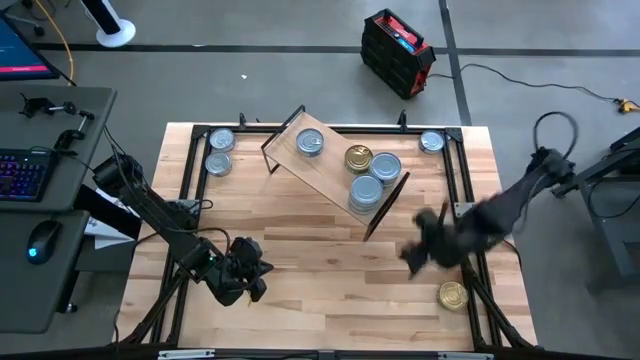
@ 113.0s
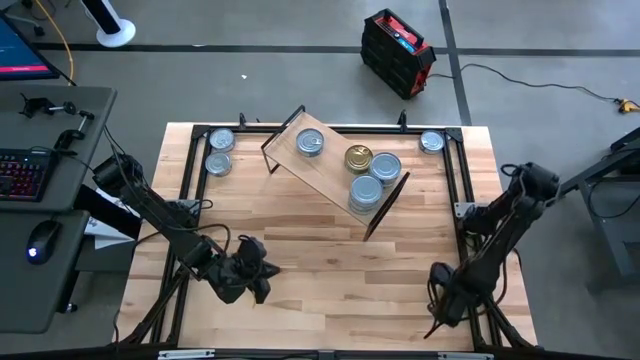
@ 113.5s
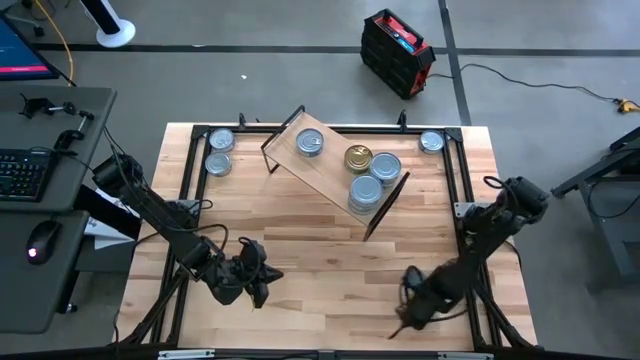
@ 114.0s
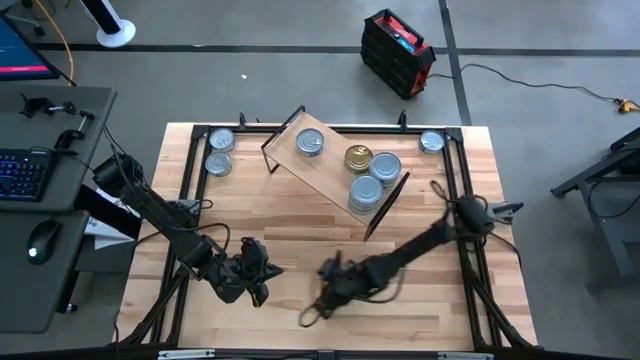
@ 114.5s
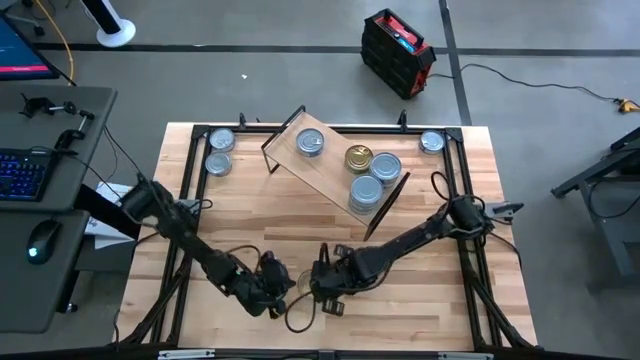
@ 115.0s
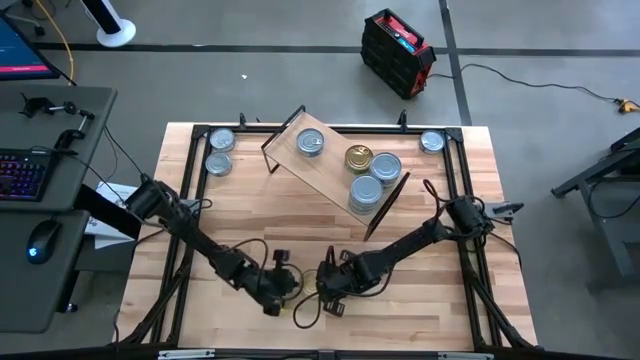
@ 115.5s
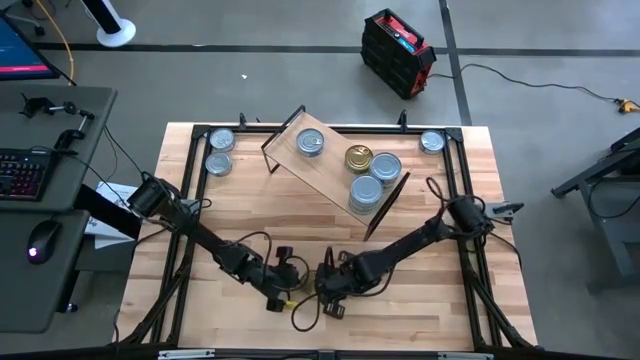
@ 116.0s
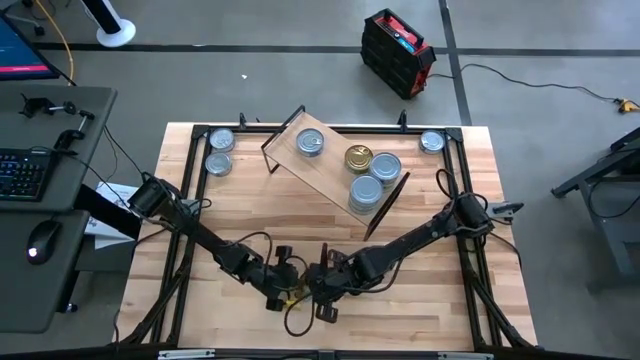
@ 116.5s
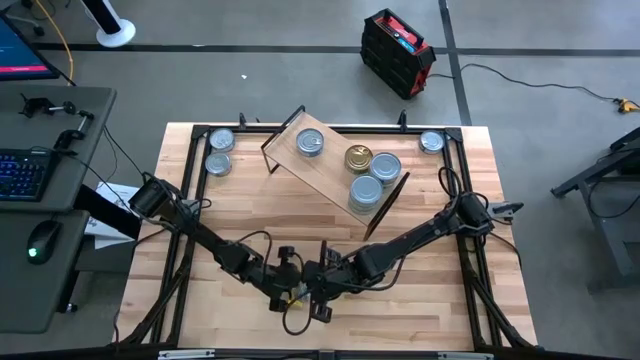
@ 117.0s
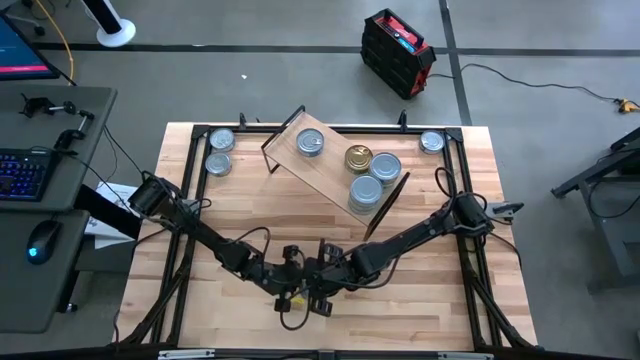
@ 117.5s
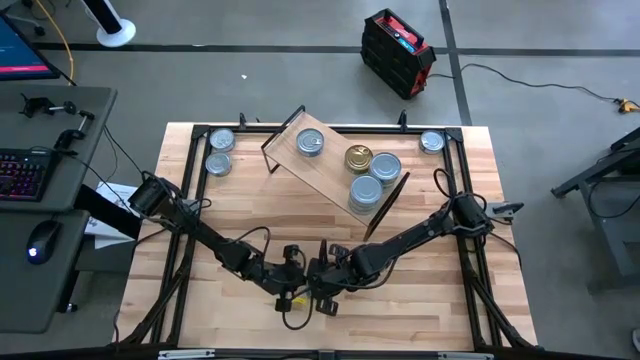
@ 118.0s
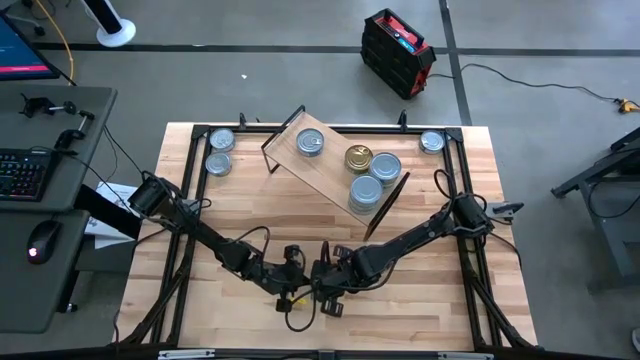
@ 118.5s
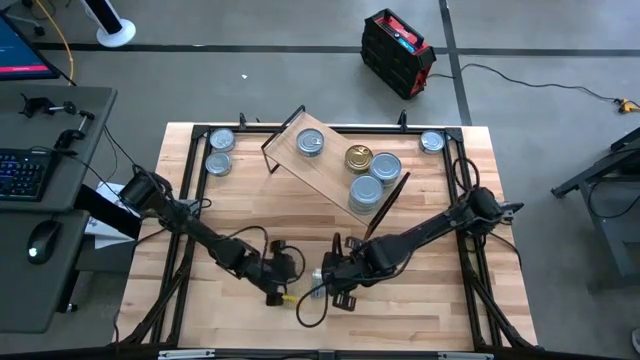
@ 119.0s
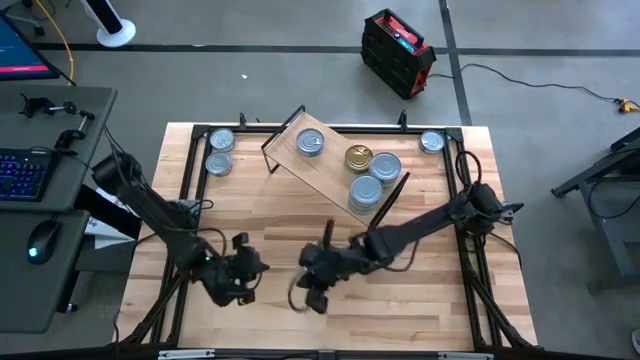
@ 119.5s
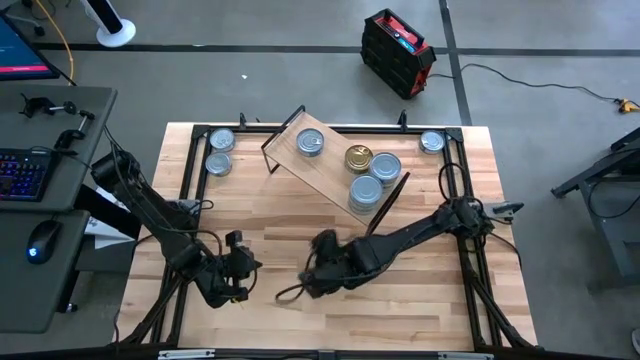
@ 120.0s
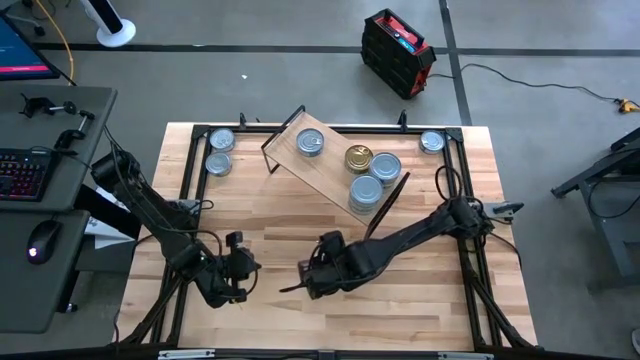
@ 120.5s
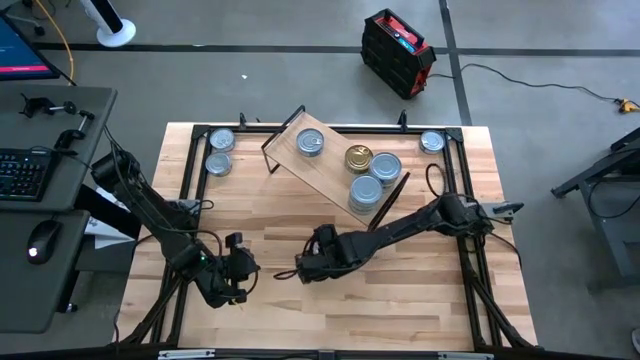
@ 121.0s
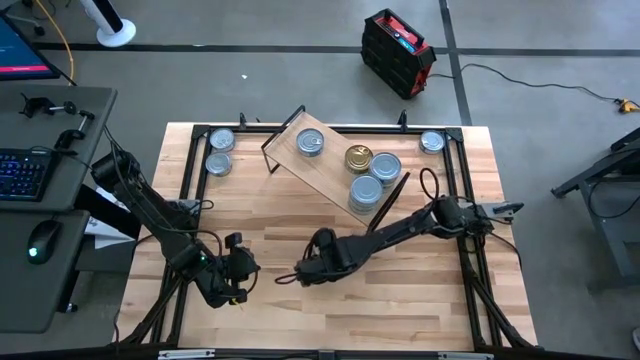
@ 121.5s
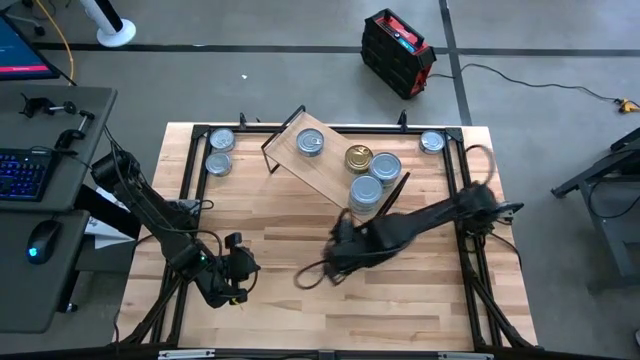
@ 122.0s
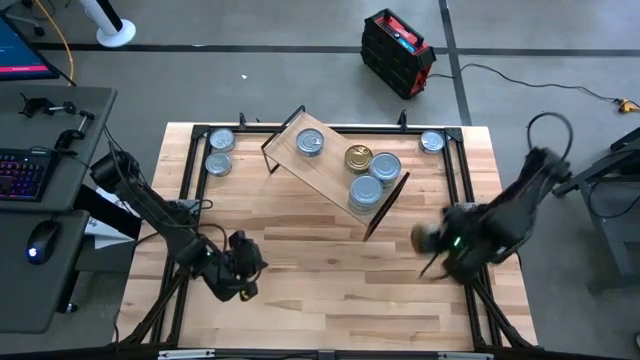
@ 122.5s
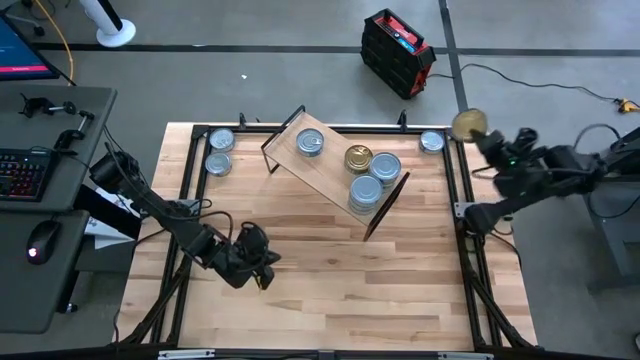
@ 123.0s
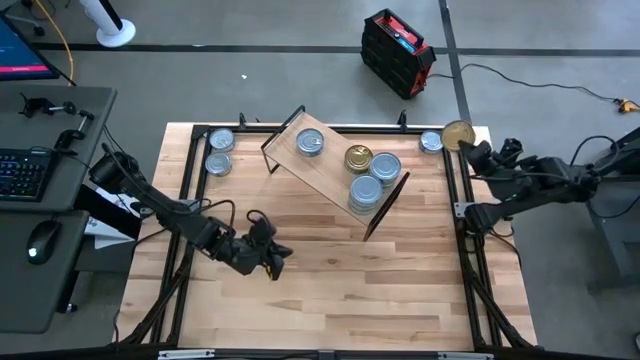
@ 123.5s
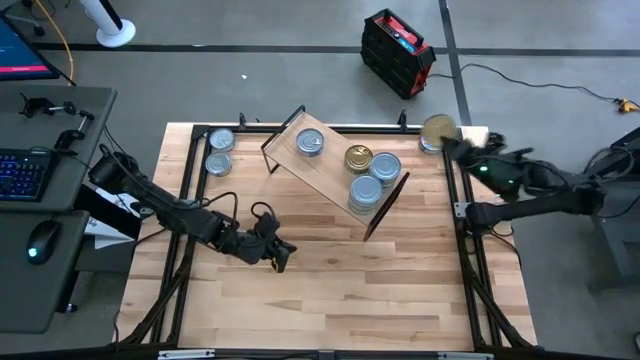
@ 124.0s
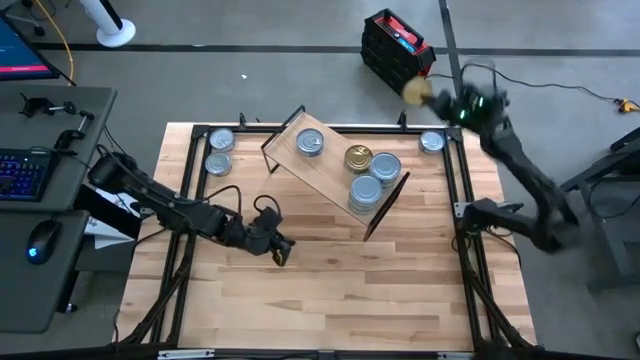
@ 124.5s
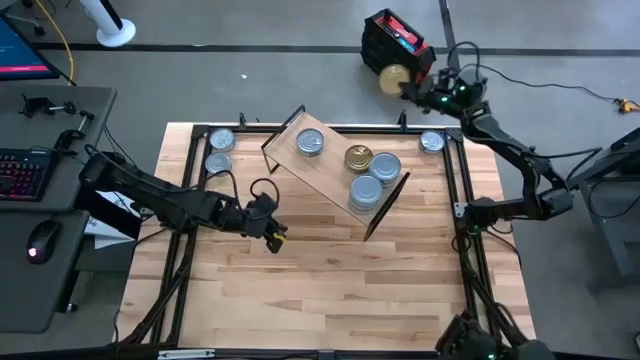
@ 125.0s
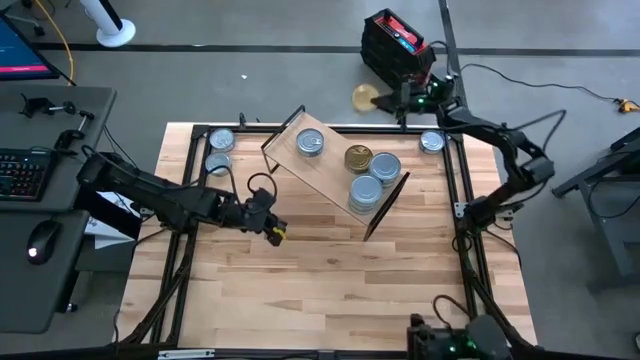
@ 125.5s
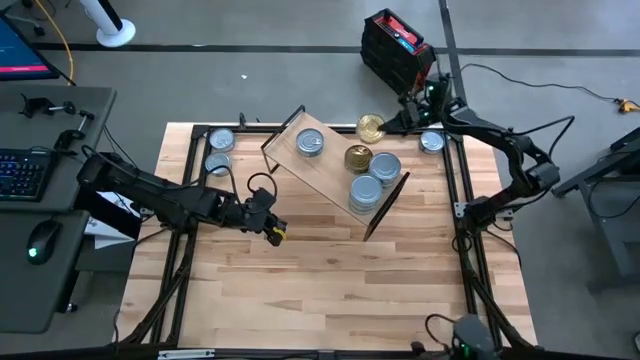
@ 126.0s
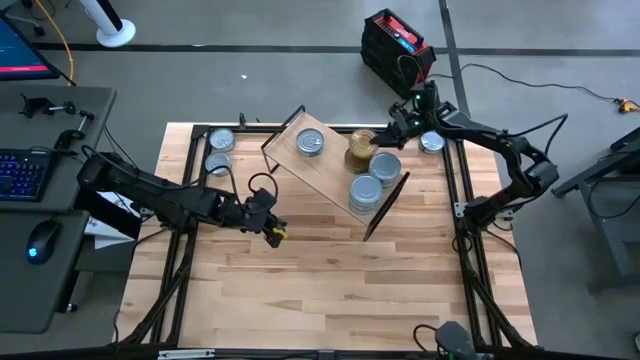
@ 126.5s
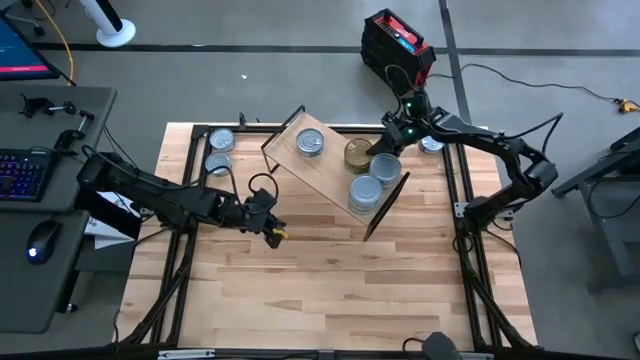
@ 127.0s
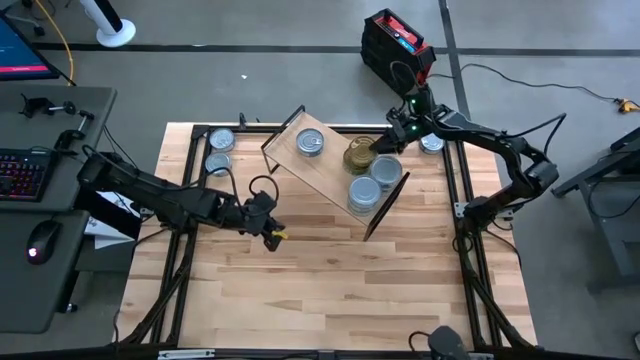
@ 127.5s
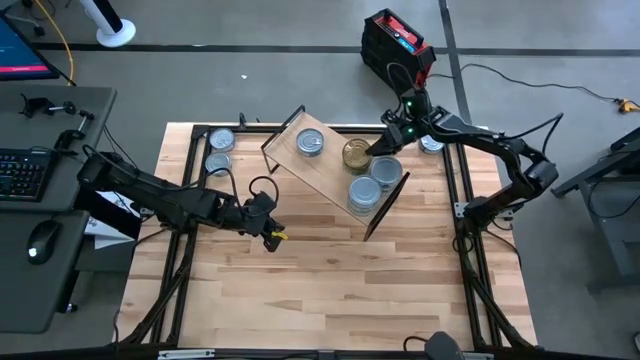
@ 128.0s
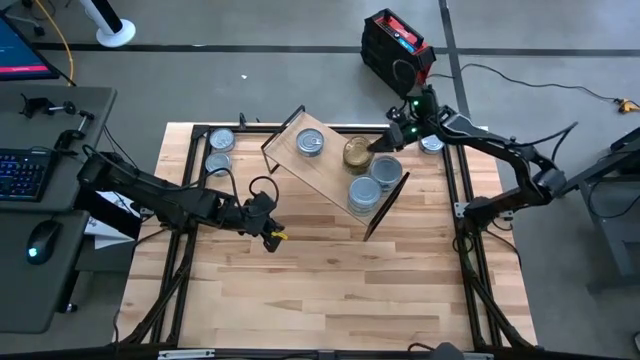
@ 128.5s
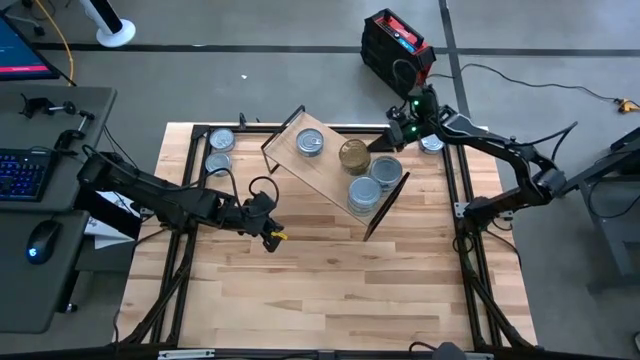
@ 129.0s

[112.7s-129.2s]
Task: Stack canned seafood by type on shelf
Stack the green tuna can on top of the other green tuna can on the shelf

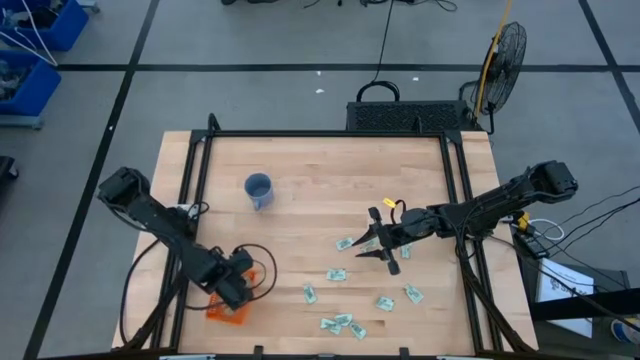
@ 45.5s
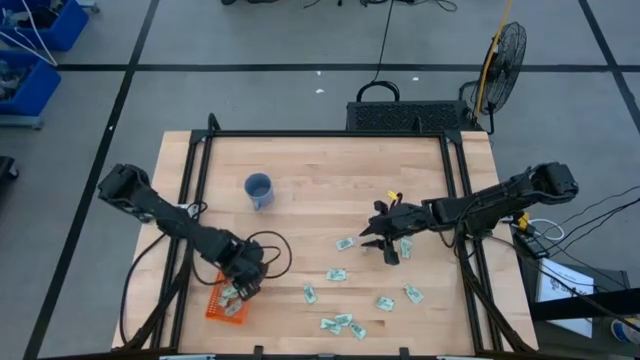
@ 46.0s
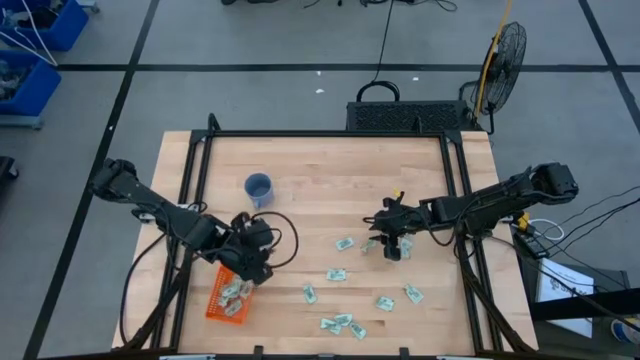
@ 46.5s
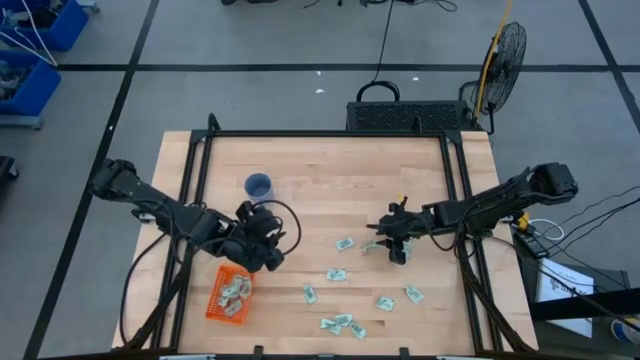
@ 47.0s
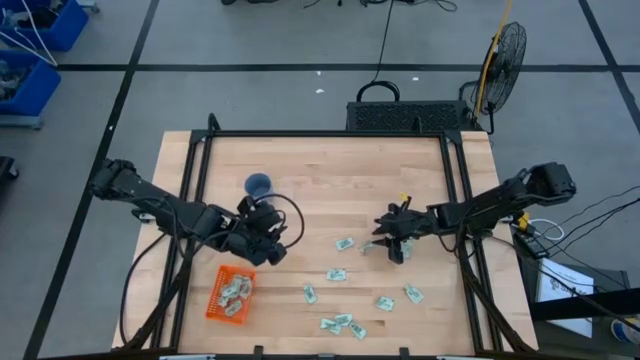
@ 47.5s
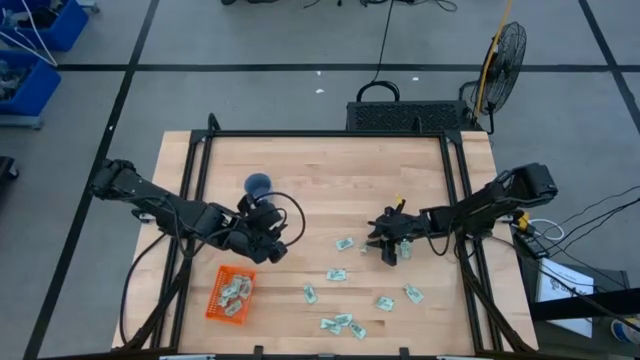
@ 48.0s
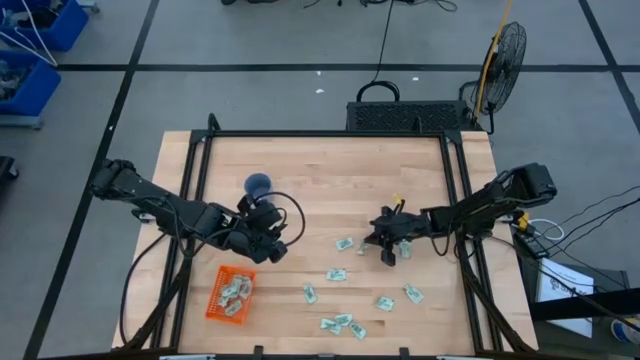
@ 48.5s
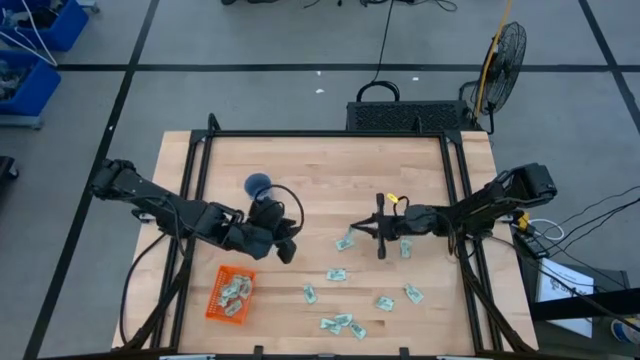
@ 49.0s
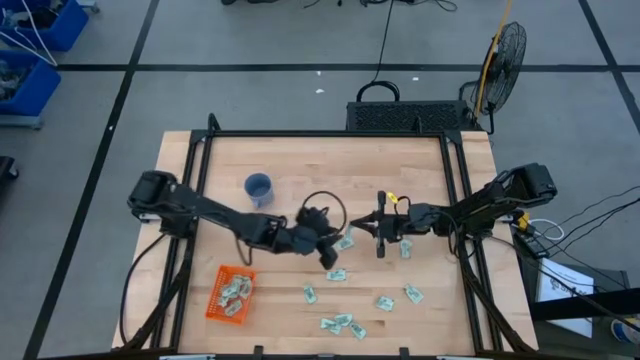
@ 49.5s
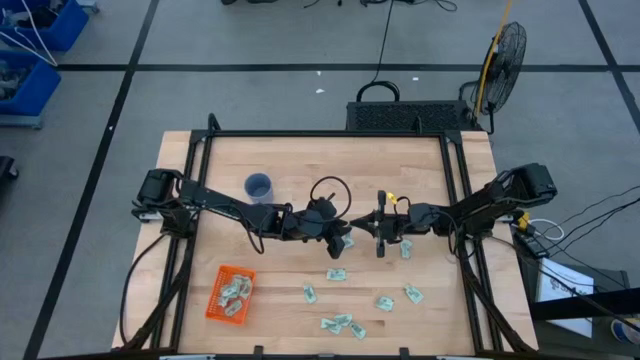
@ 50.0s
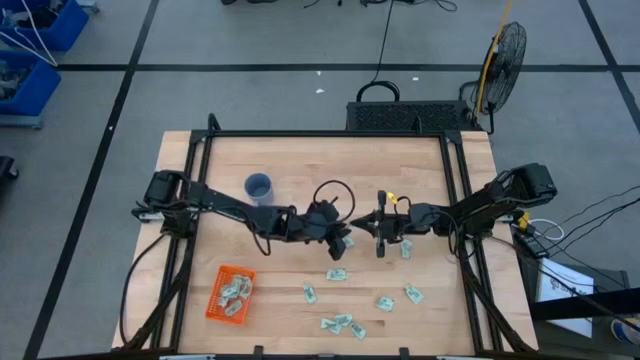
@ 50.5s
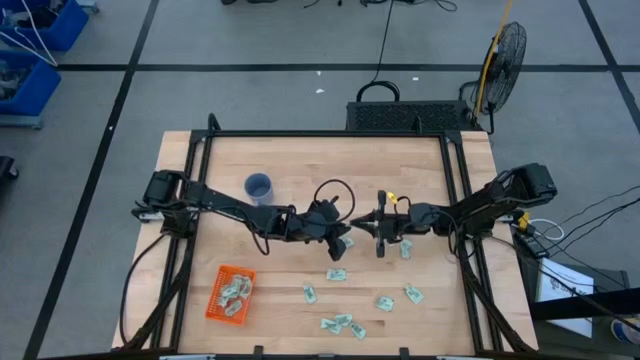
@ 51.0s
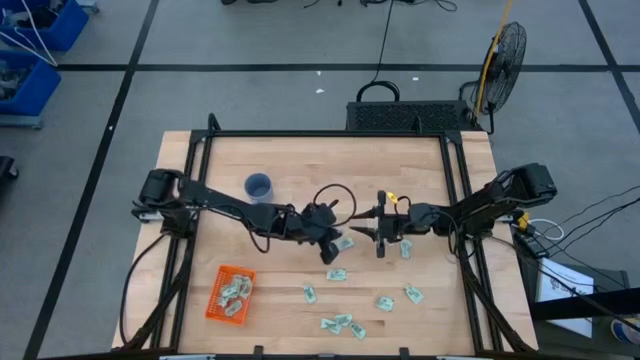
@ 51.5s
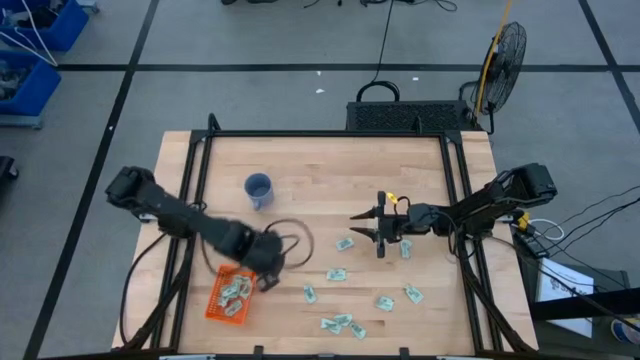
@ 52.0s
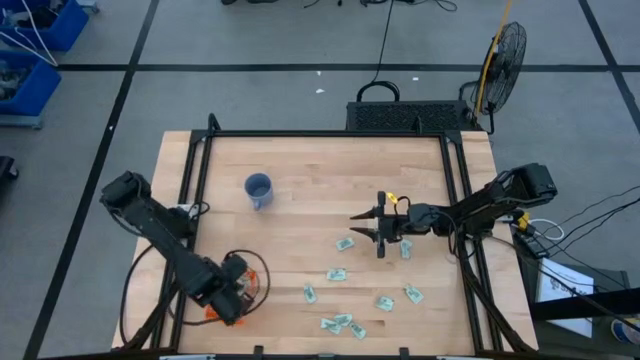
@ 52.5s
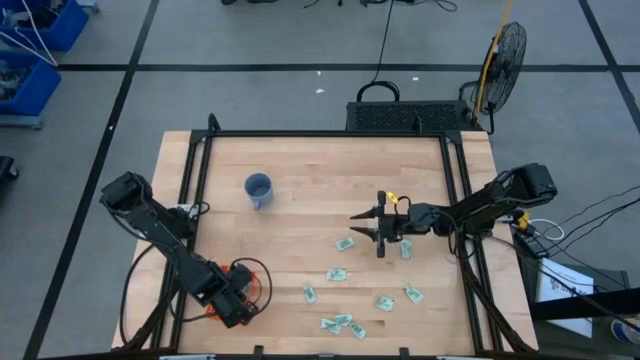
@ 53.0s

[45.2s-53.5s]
Task: Pick and place Stevia / Truvia into bins
Put the stevia packet into the orange bin
